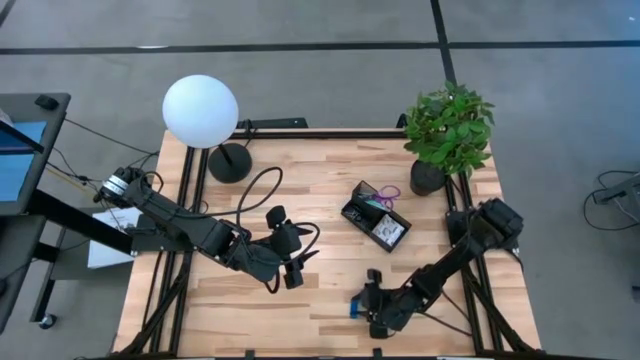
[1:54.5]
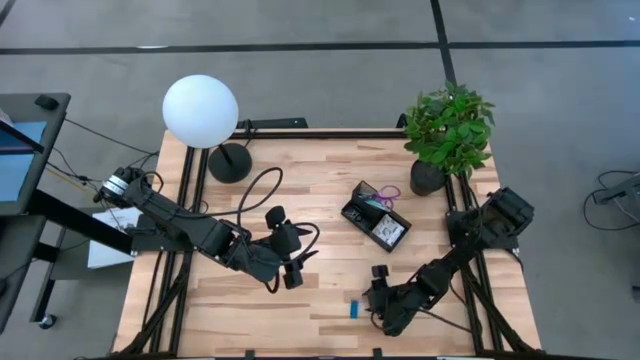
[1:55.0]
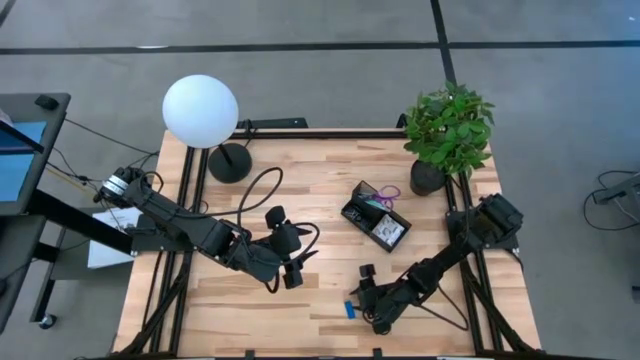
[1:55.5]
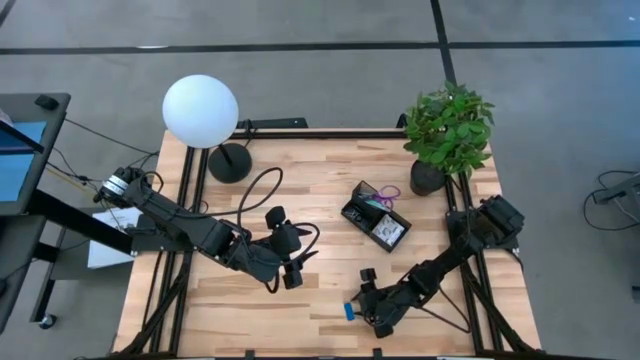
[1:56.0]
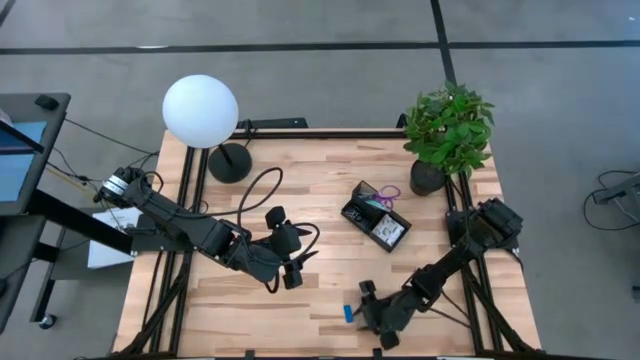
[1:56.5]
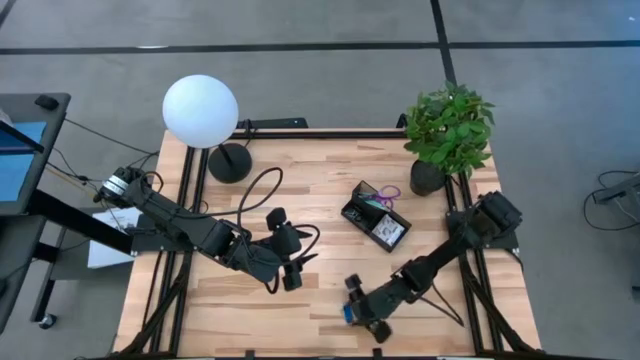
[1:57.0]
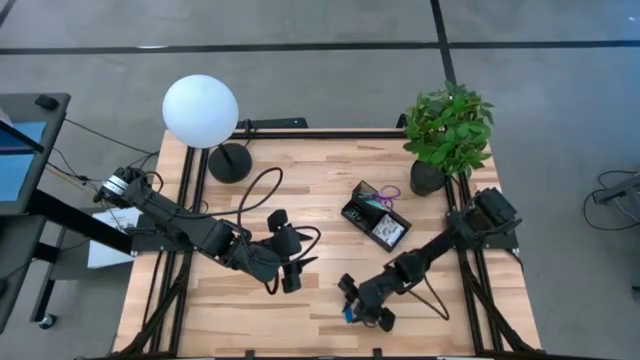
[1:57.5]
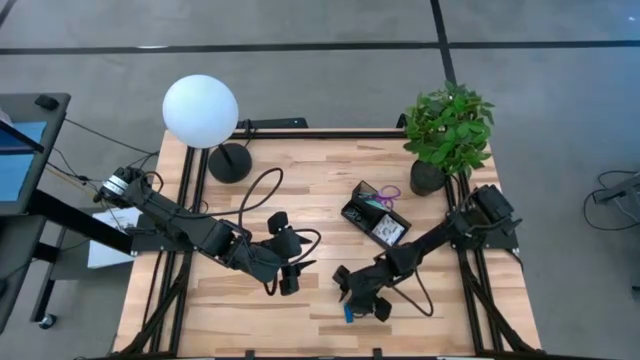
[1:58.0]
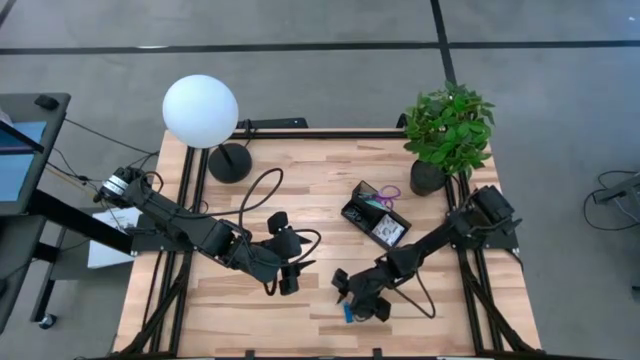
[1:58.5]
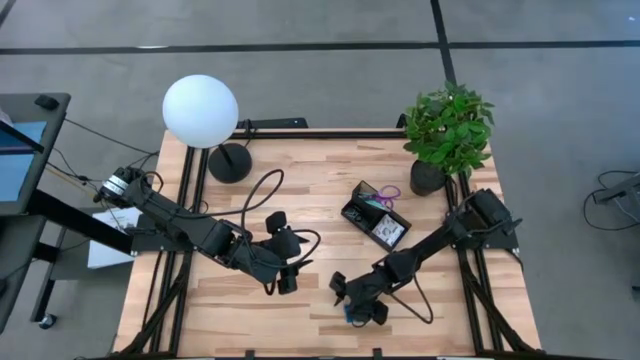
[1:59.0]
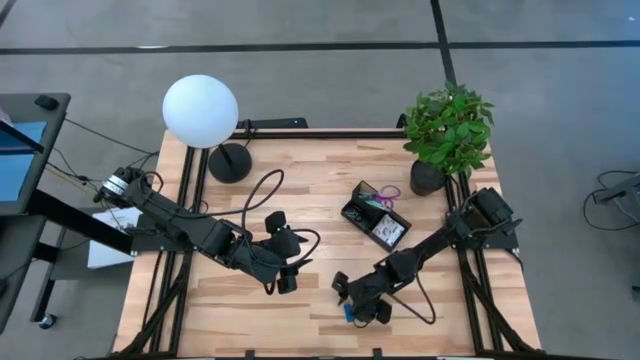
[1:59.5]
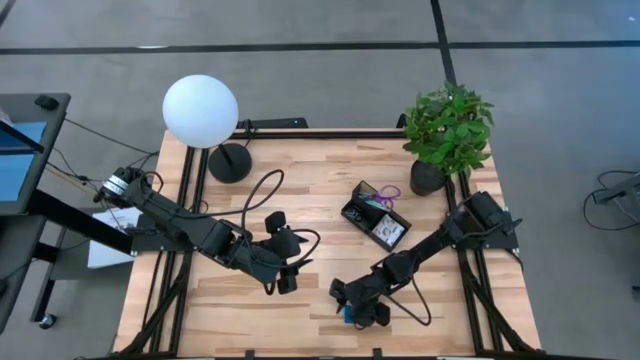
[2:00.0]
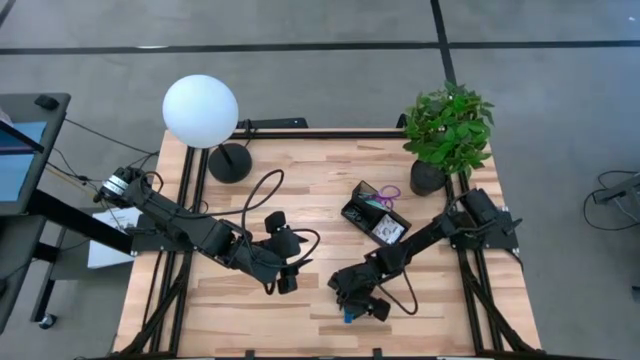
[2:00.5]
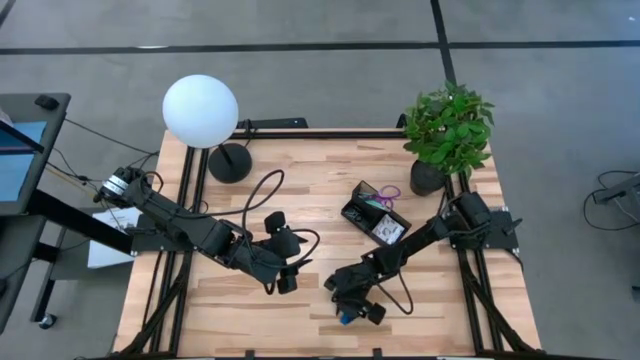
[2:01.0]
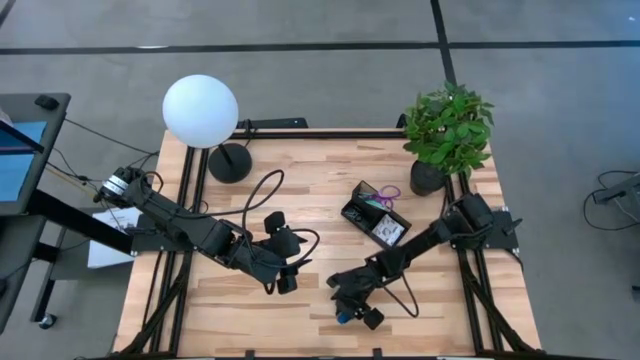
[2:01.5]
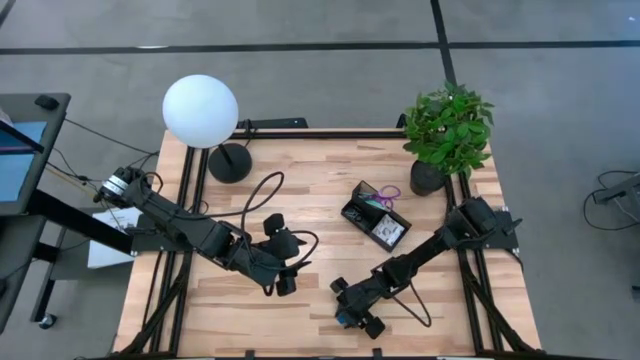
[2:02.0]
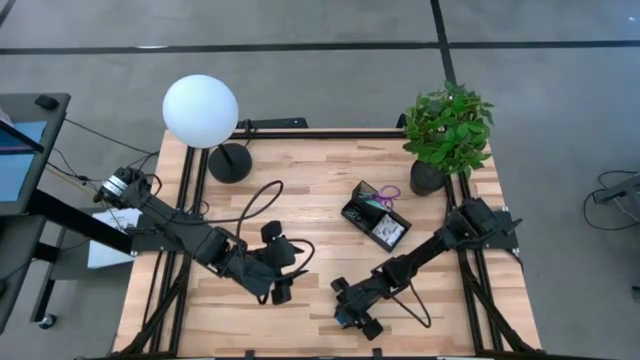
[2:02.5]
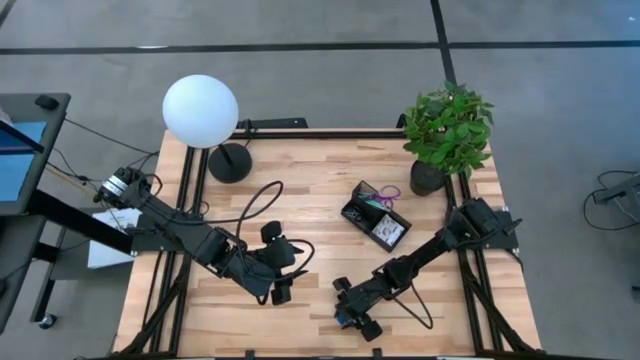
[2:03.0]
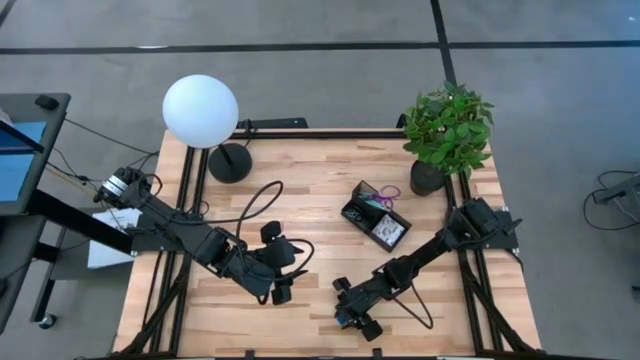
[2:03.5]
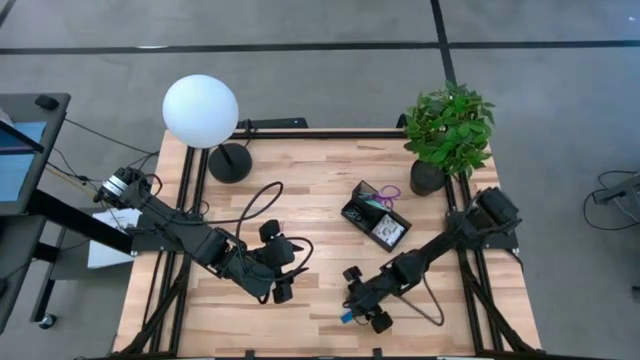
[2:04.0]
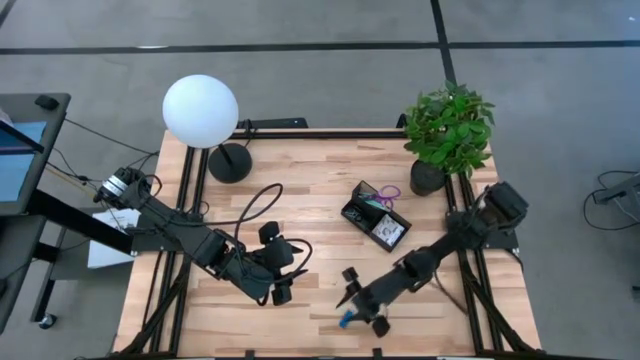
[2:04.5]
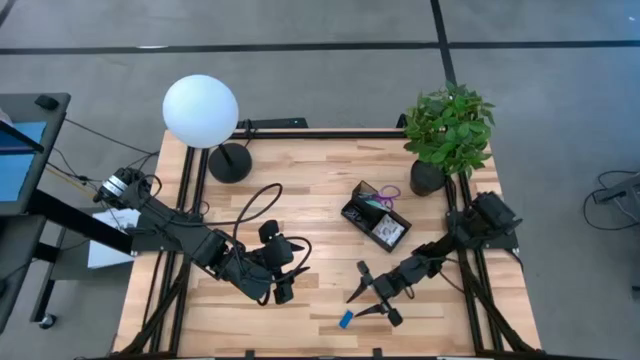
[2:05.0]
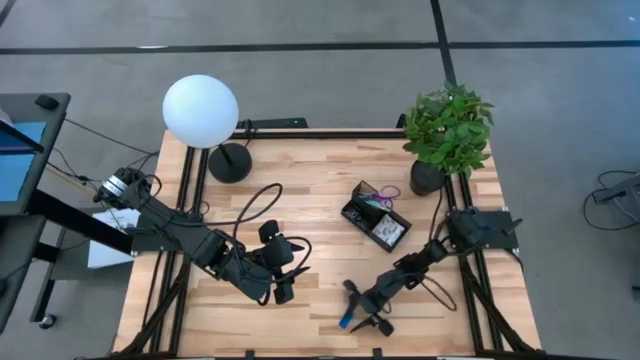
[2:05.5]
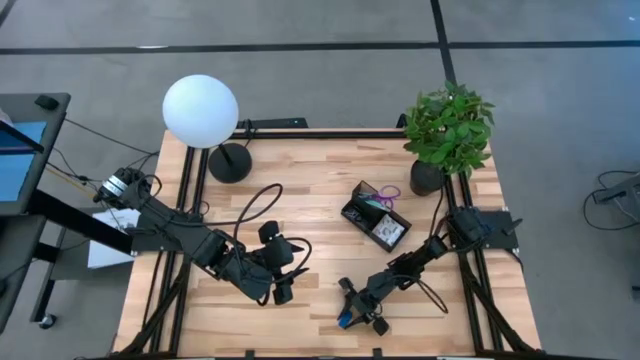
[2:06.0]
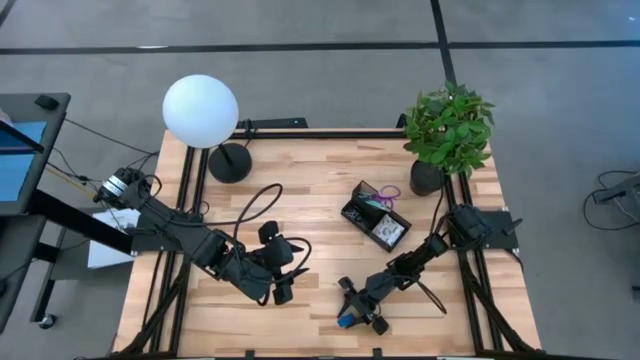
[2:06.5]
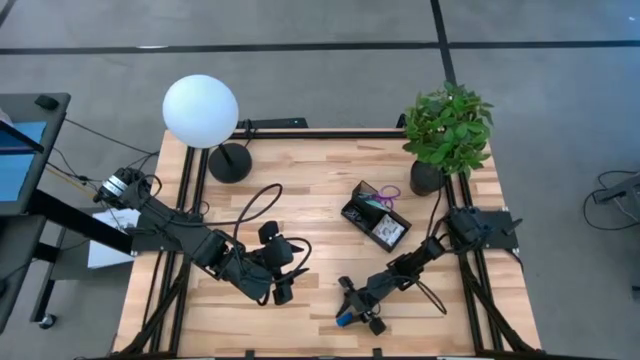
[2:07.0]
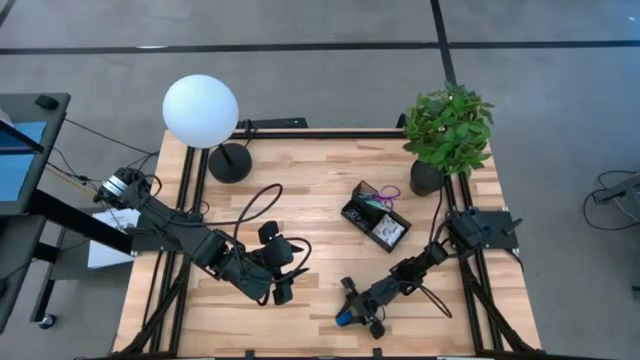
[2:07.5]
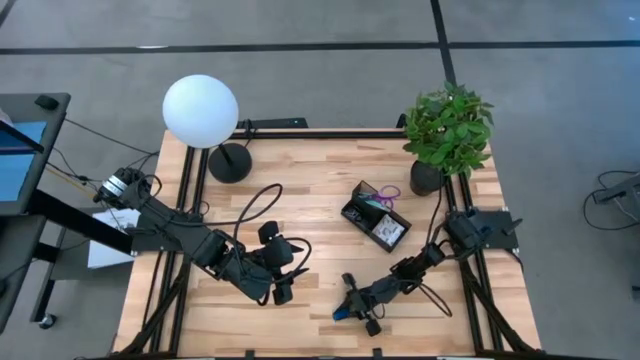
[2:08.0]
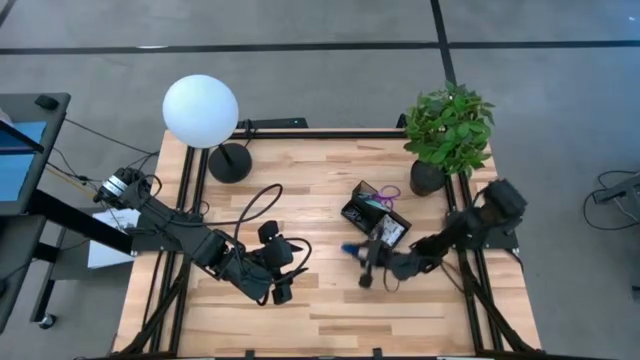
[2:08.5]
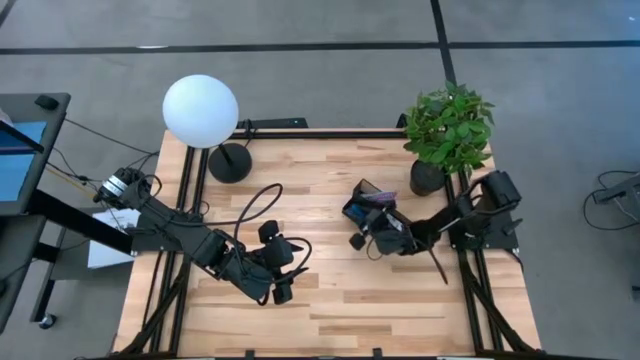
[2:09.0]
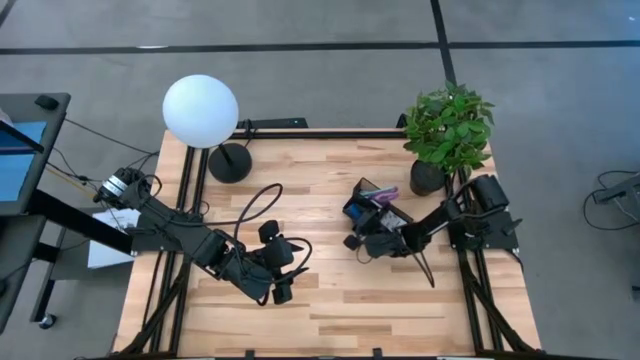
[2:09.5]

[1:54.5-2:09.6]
Task: Pick and place office supplies into organizer
Put the blue eraser into the black desk organizer

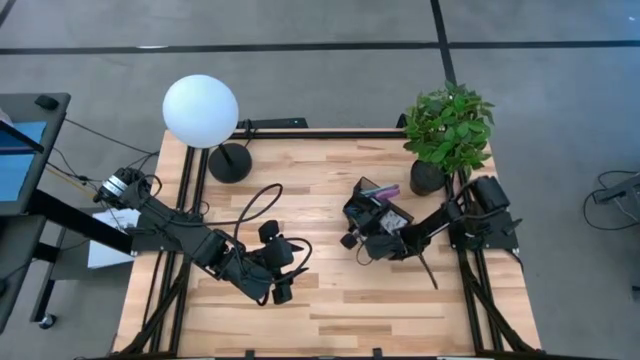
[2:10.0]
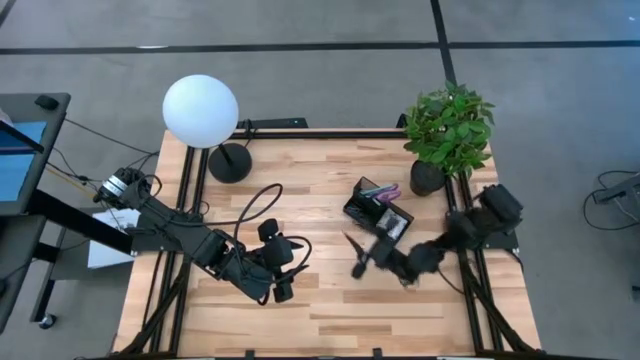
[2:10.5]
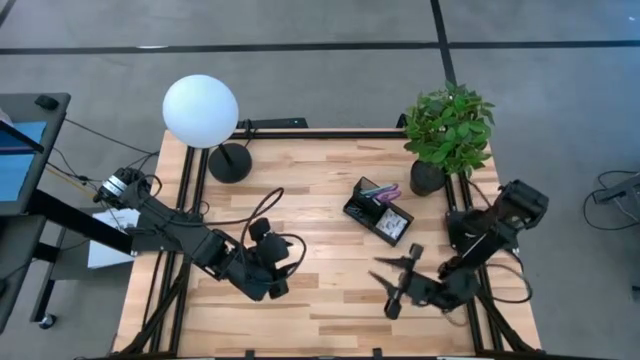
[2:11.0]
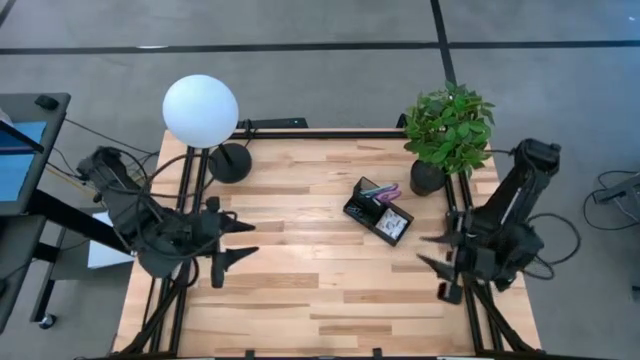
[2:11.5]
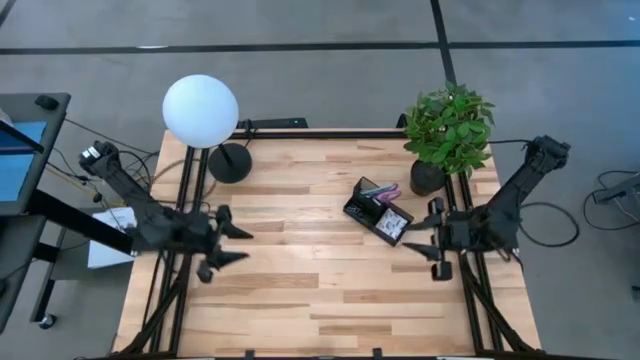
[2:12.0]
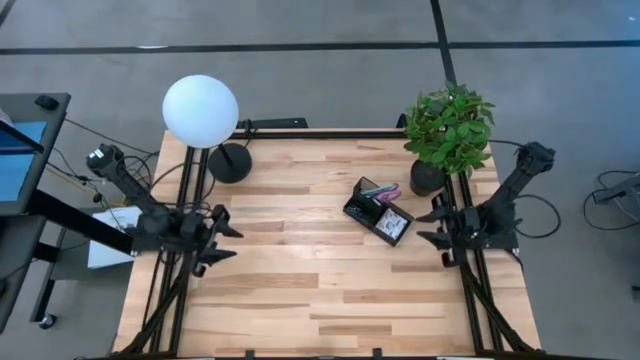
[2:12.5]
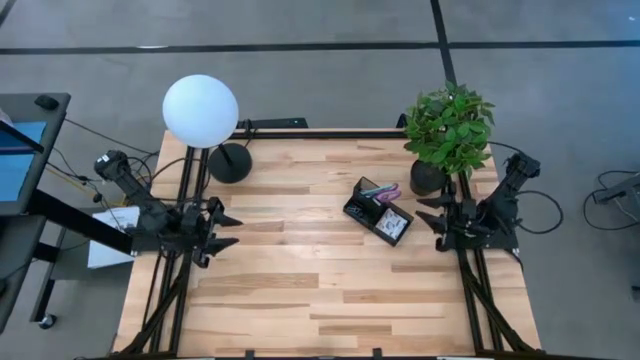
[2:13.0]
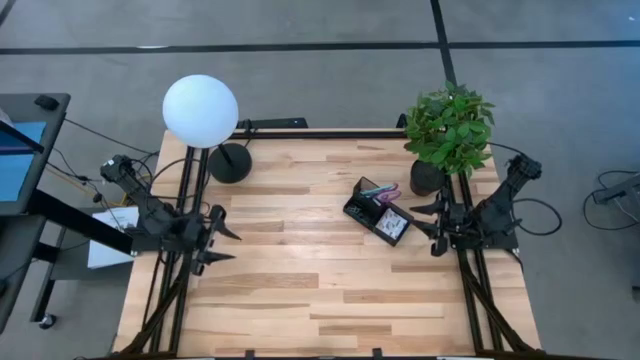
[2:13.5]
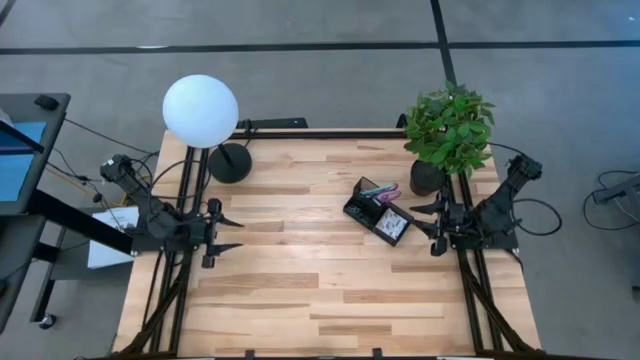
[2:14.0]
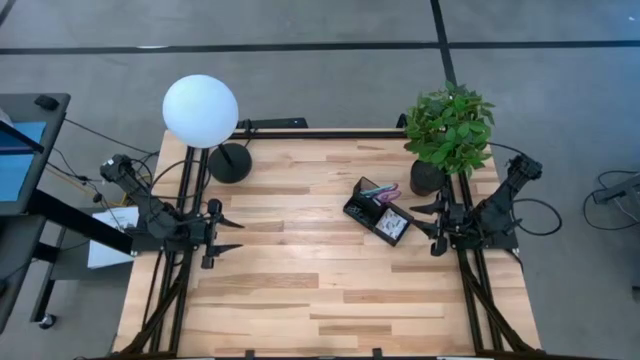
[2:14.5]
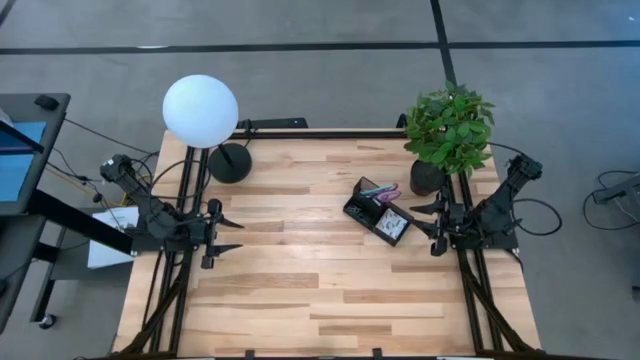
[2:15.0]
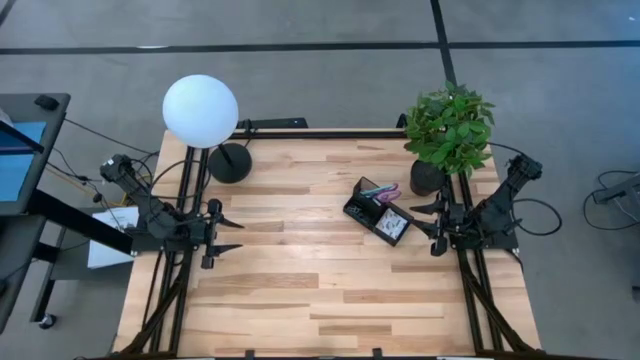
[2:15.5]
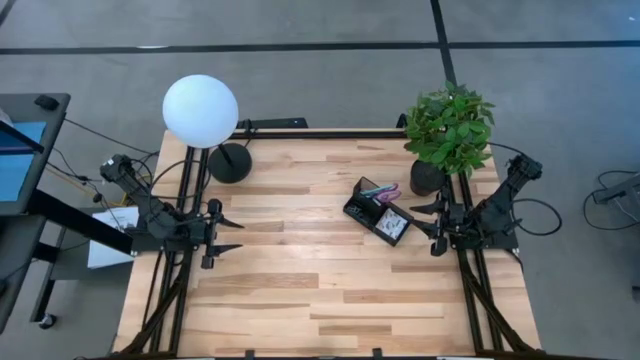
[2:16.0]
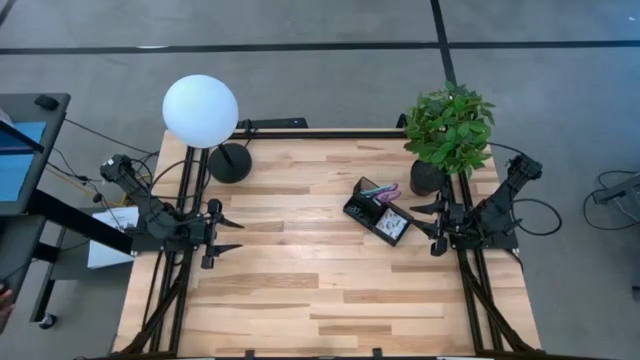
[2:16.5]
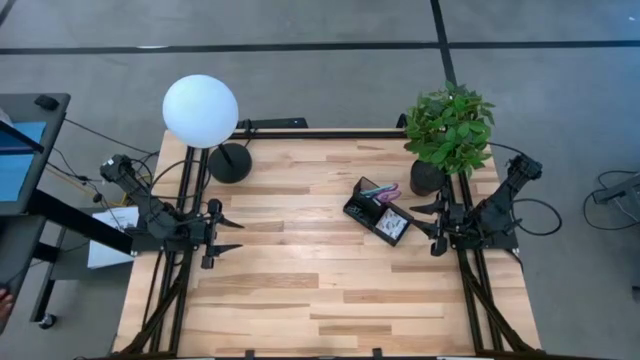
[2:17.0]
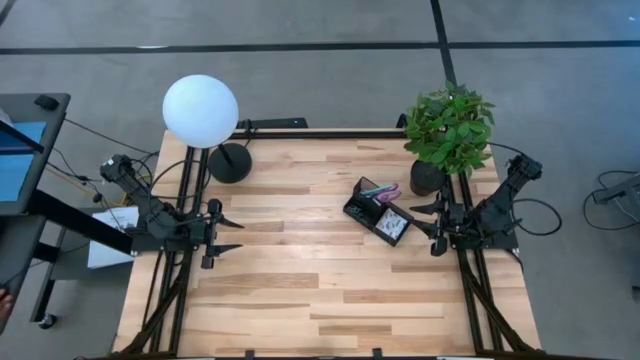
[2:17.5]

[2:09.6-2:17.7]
Return to Home Position
